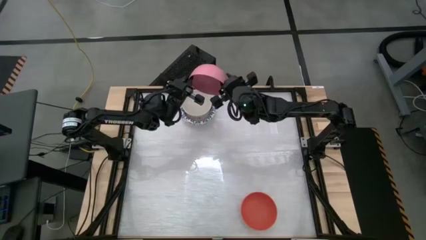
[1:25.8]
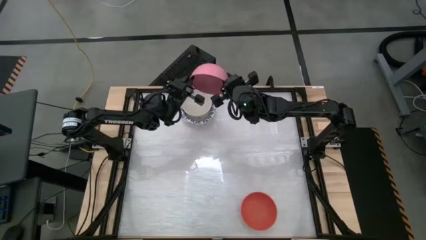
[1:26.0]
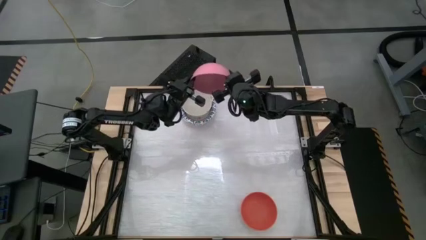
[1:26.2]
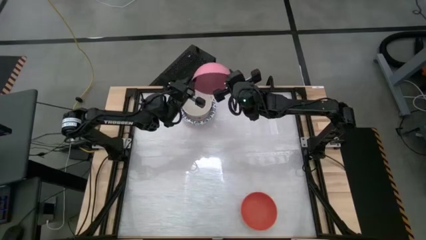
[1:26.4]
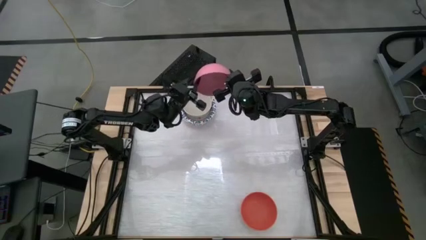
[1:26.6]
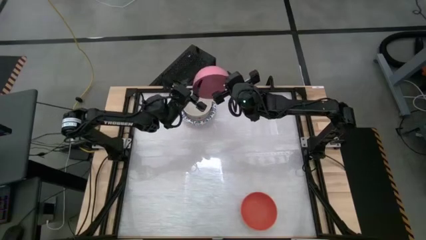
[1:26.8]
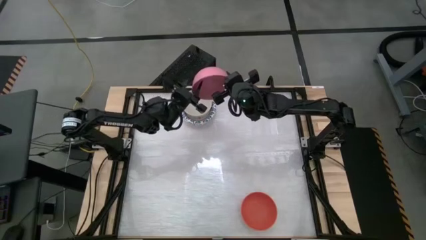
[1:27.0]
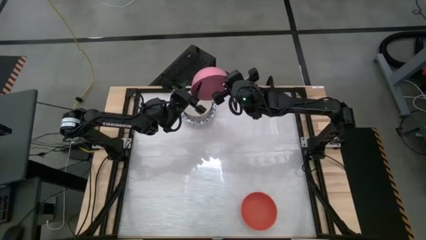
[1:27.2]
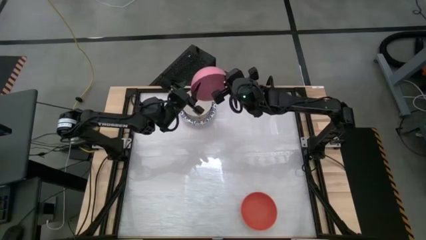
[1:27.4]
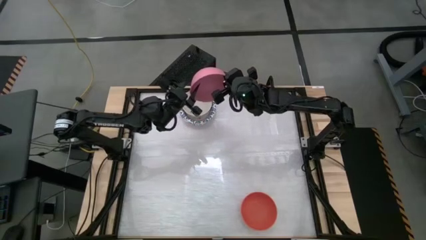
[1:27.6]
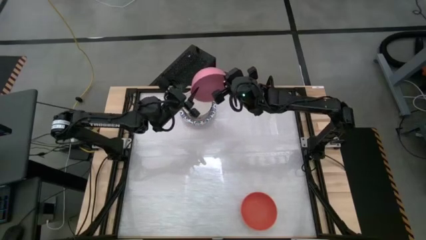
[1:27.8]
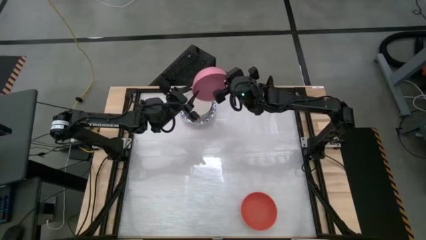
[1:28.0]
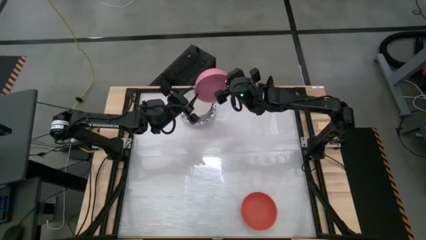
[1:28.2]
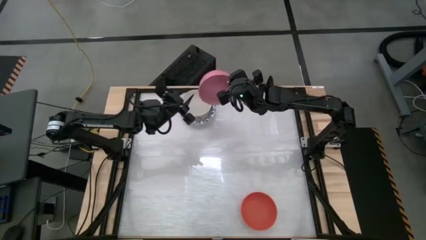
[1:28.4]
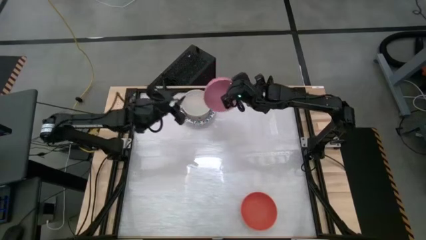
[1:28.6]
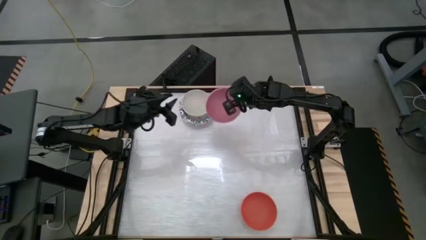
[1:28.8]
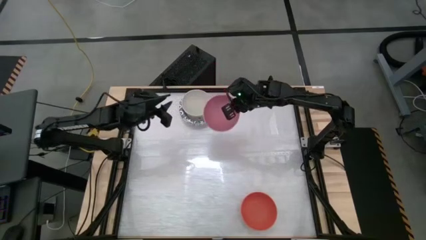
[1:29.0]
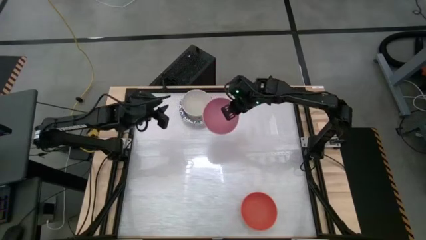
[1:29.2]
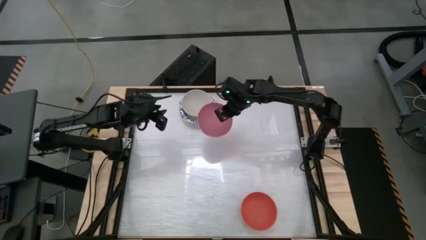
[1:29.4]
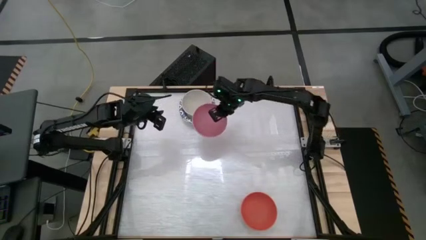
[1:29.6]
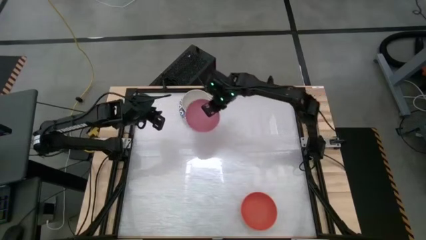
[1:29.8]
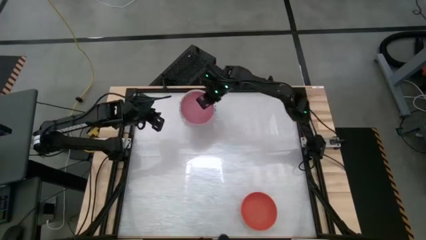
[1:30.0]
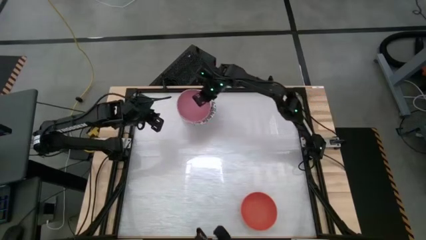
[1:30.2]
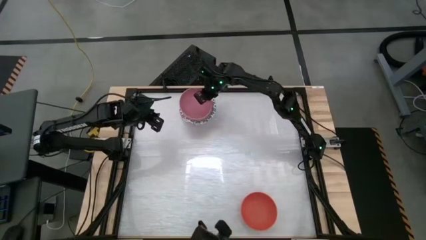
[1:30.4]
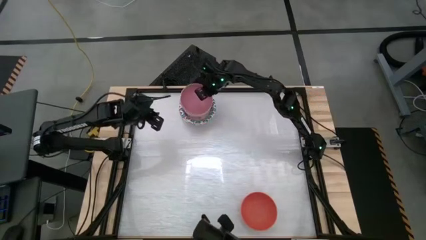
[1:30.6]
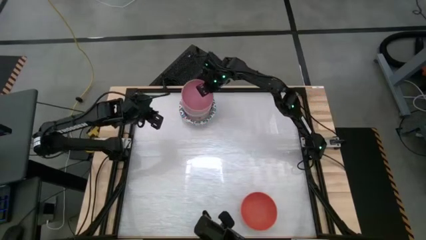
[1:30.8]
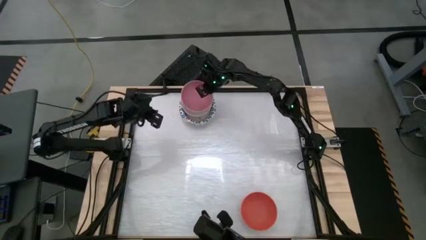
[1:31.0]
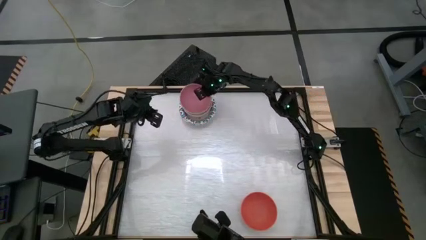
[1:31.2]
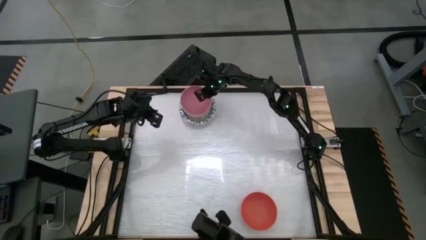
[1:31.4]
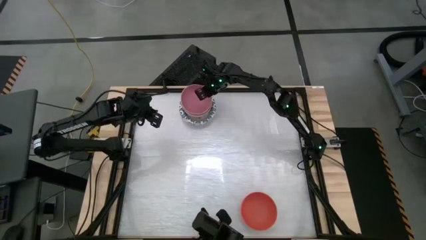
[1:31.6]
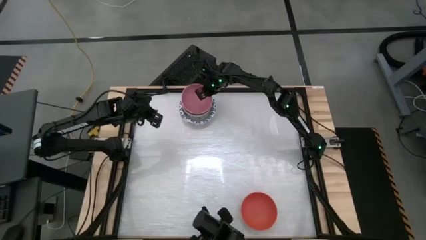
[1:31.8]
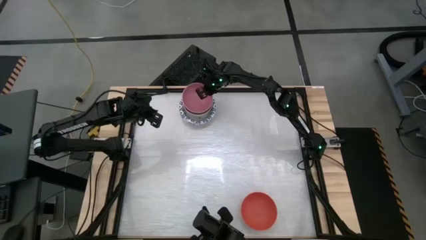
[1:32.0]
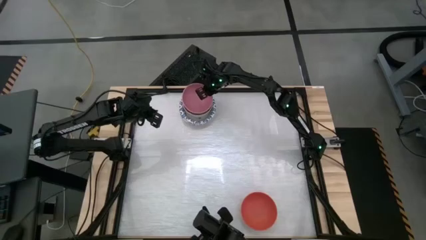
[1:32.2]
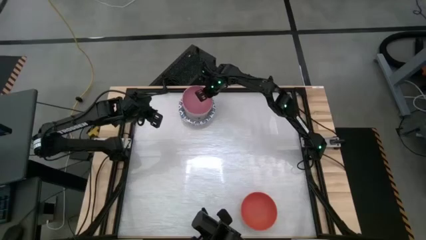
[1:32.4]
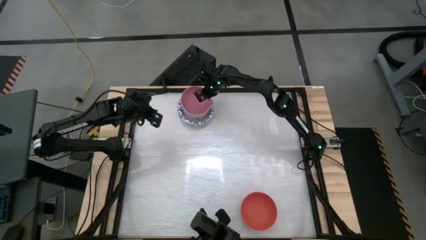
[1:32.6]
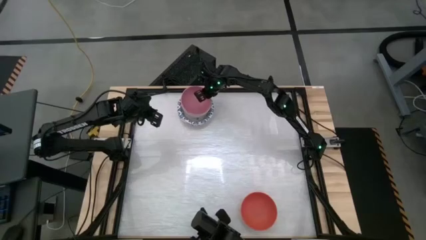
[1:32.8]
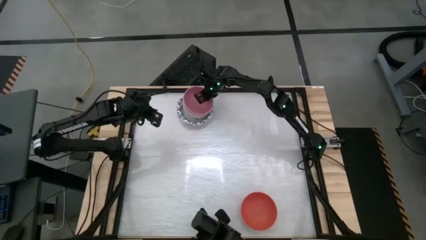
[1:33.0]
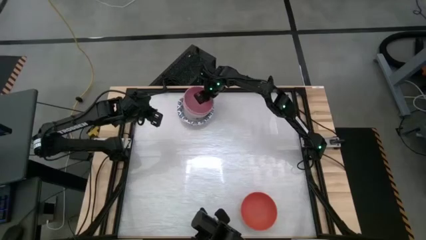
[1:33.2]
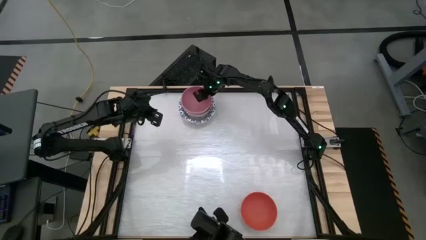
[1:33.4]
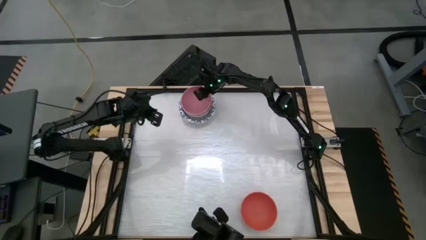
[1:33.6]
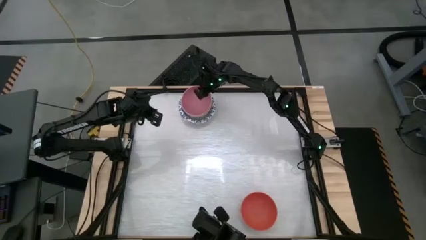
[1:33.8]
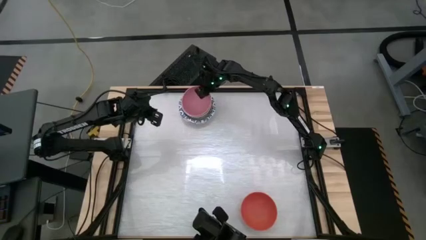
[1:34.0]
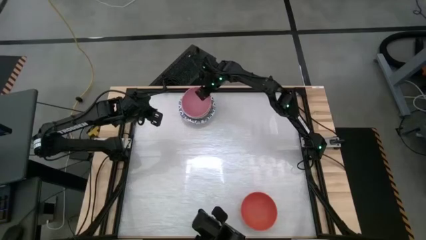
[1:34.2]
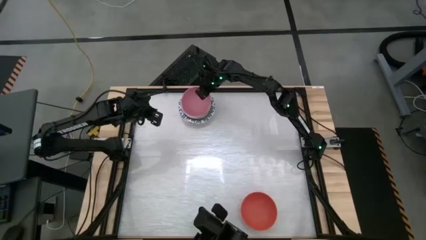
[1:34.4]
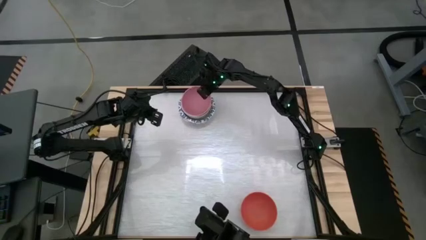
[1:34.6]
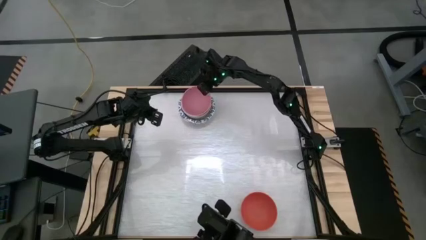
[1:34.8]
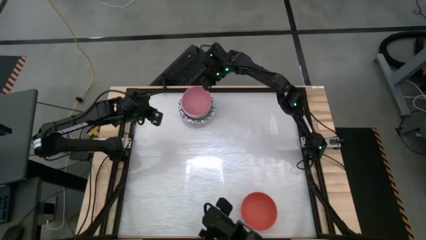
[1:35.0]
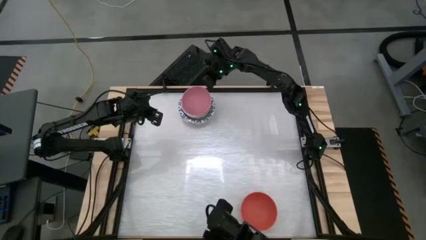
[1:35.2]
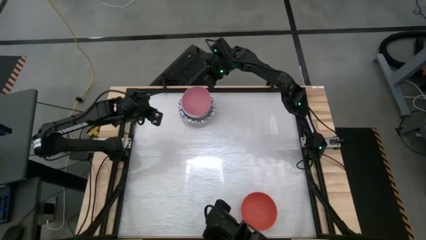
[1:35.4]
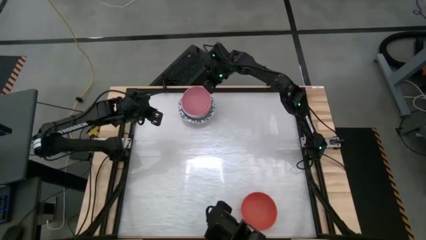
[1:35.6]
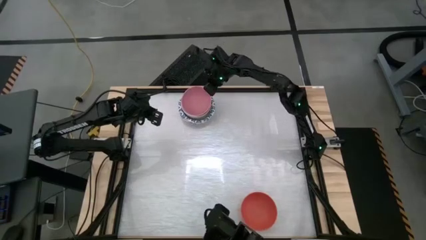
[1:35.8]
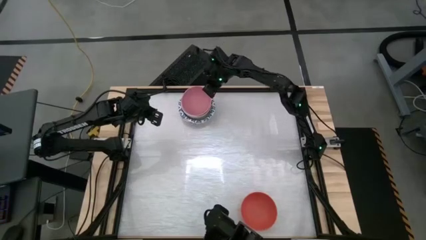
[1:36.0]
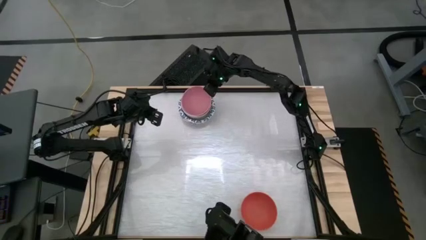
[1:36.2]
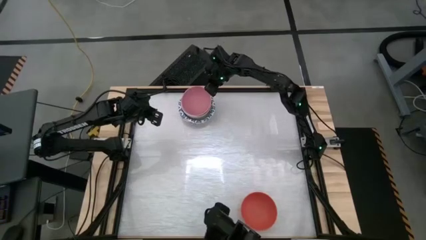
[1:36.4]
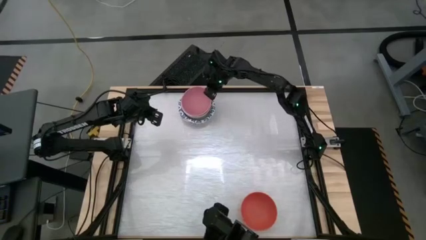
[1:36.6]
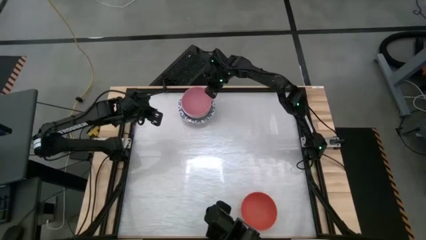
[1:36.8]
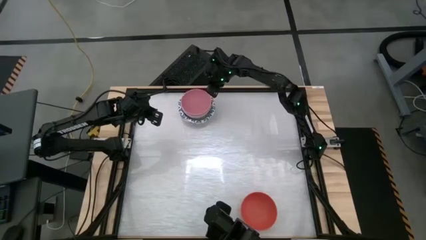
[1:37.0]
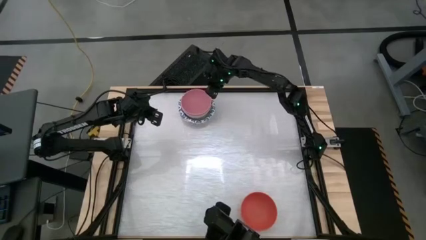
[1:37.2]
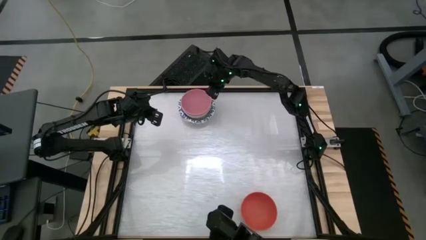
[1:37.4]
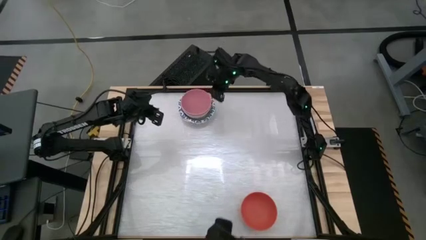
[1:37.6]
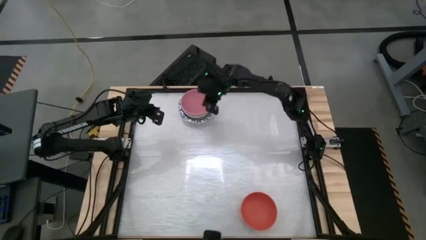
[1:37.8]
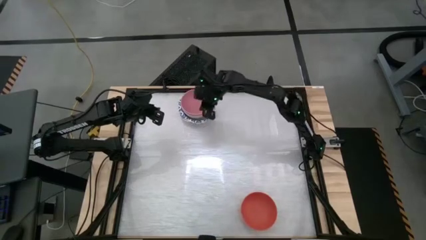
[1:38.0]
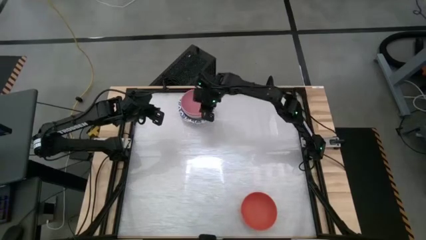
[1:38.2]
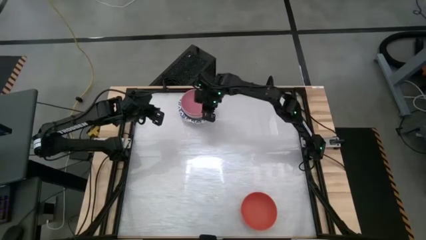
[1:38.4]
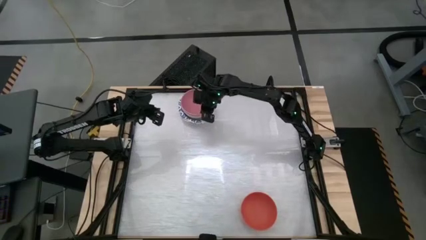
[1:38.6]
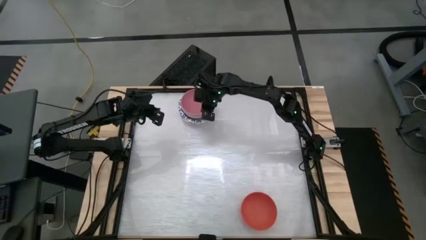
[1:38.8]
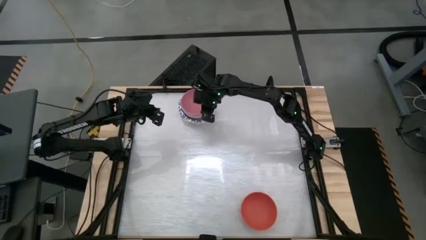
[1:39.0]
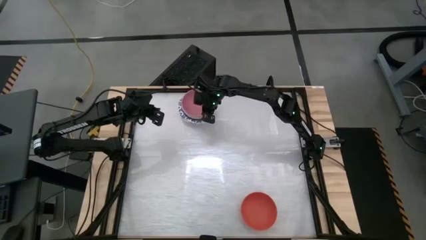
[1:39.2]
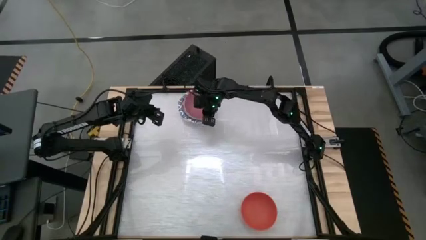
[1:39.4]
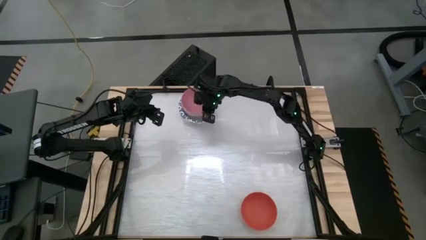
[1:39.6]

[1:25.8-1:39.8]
Stack the pink bowl on top of the white bowl
